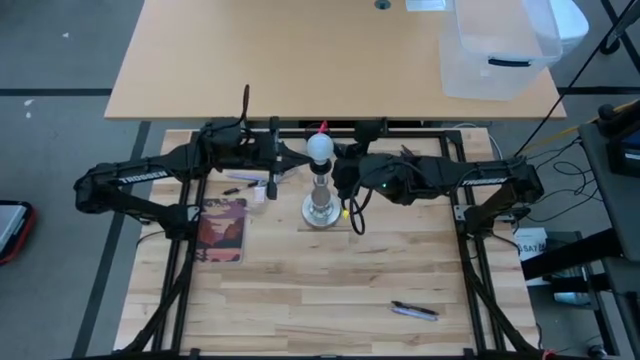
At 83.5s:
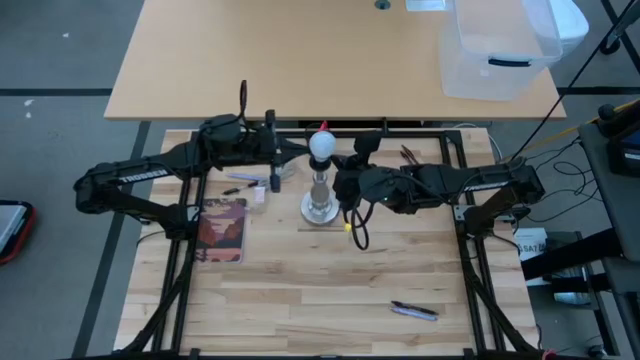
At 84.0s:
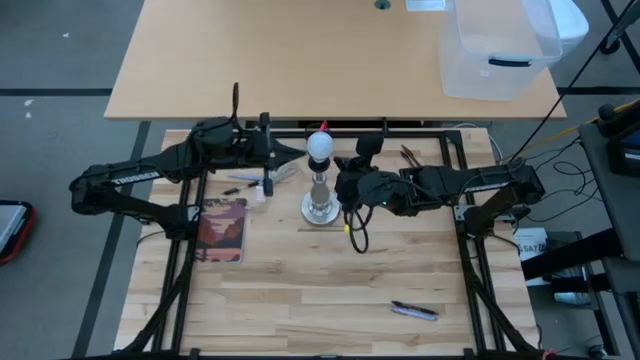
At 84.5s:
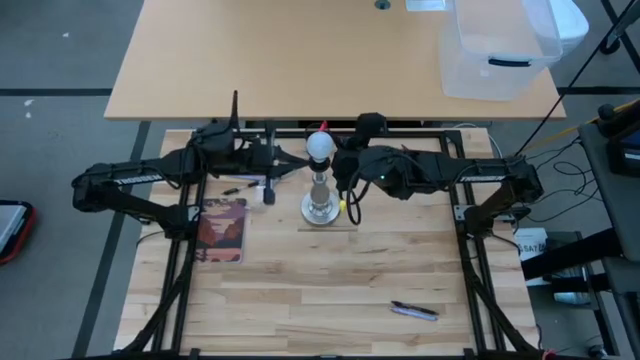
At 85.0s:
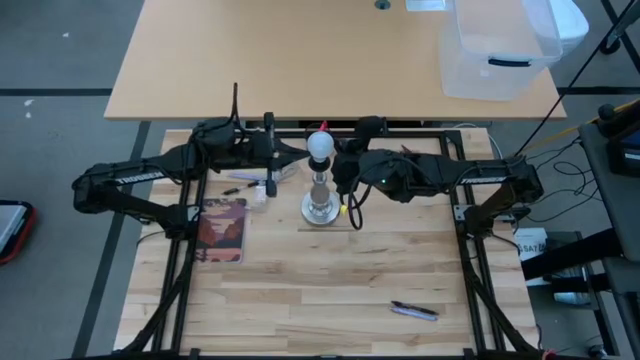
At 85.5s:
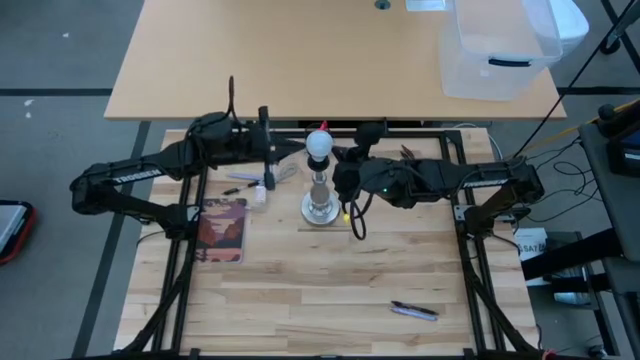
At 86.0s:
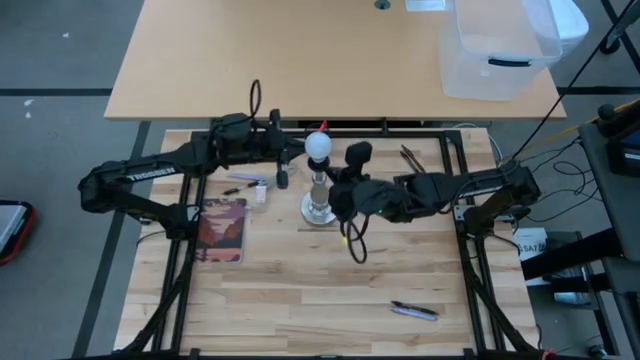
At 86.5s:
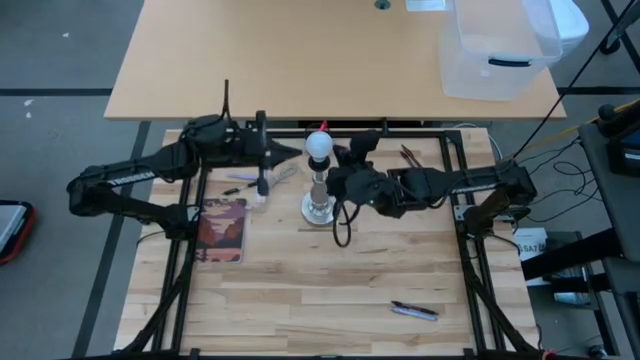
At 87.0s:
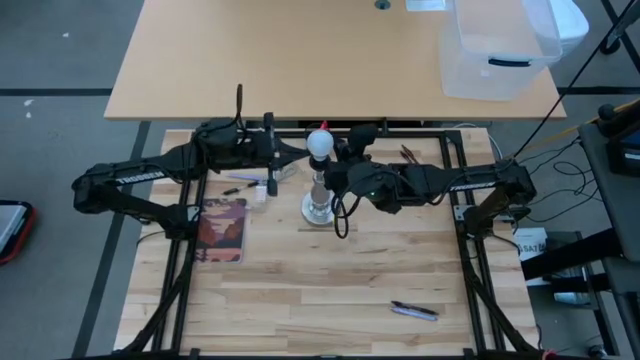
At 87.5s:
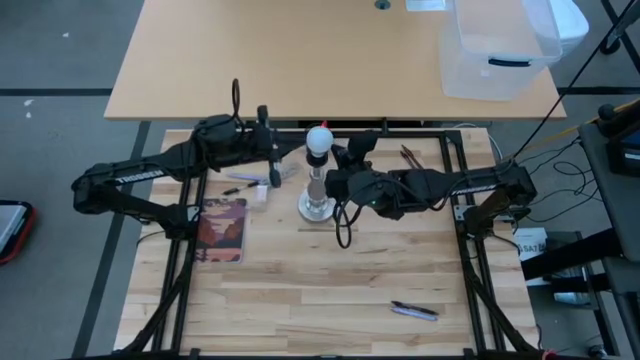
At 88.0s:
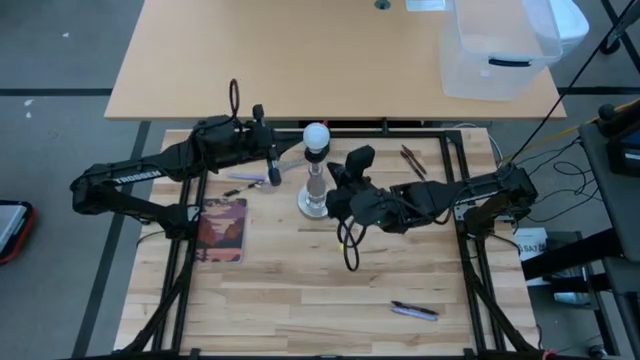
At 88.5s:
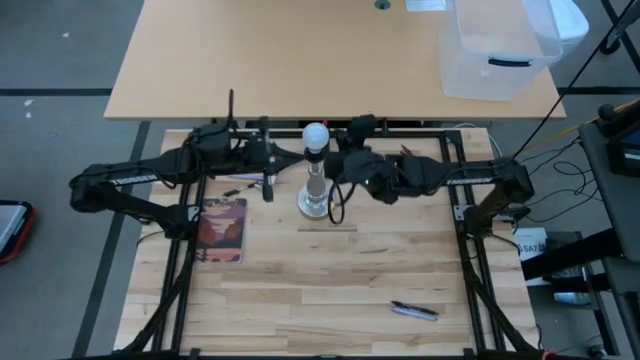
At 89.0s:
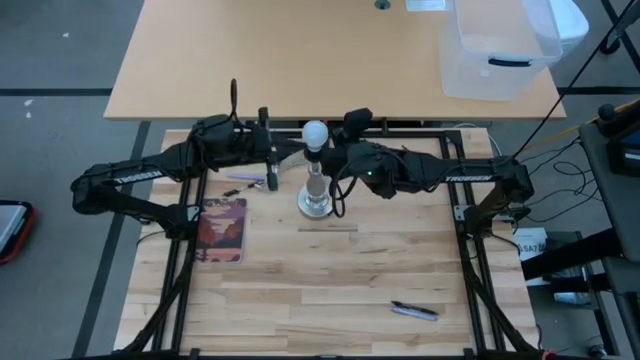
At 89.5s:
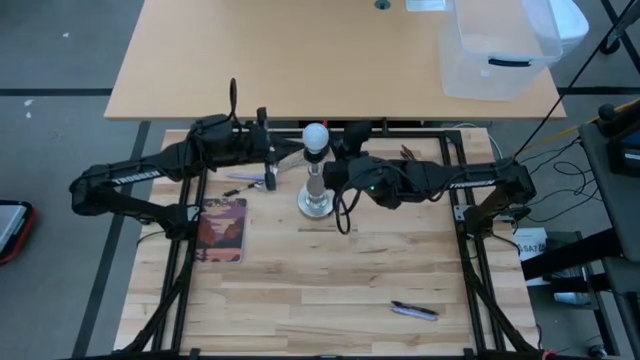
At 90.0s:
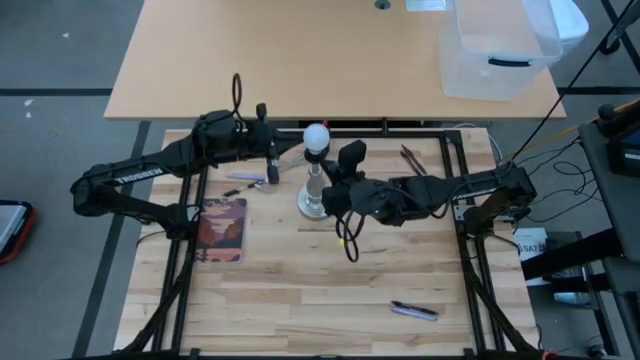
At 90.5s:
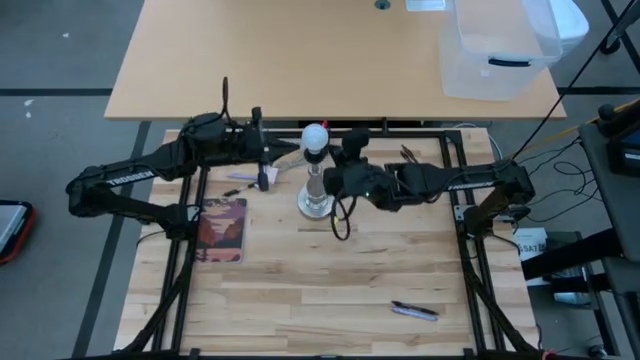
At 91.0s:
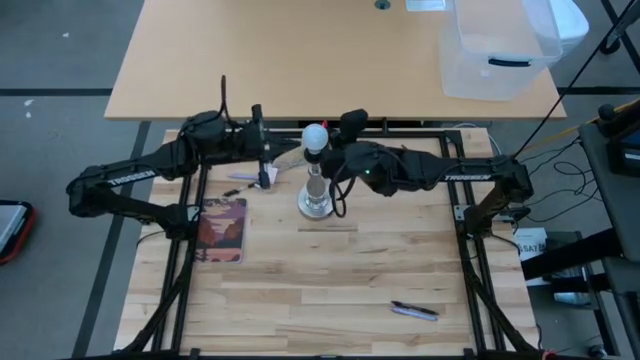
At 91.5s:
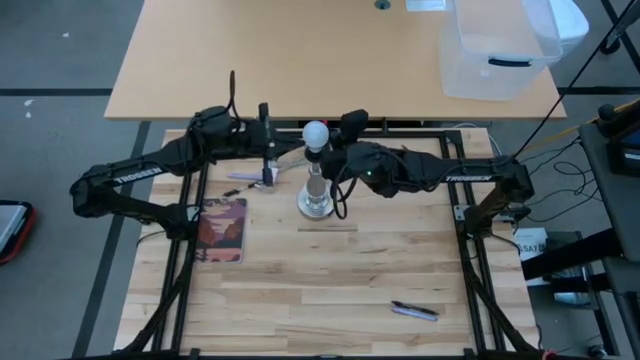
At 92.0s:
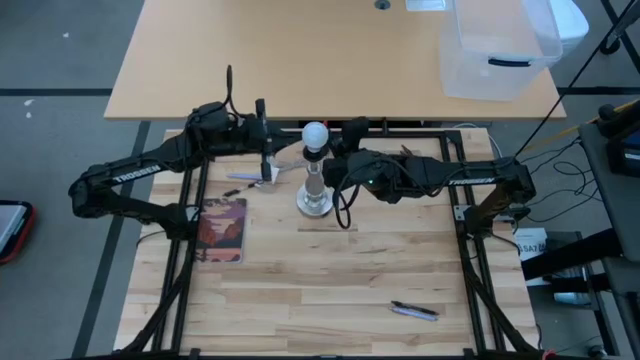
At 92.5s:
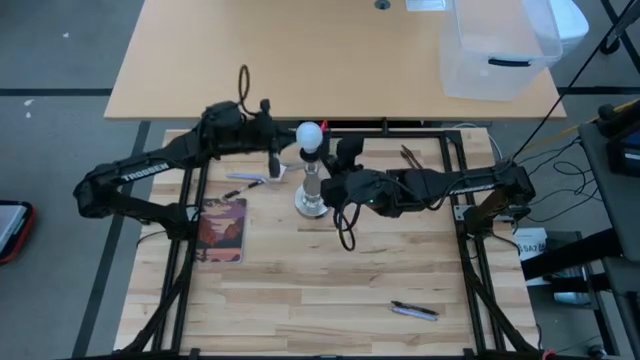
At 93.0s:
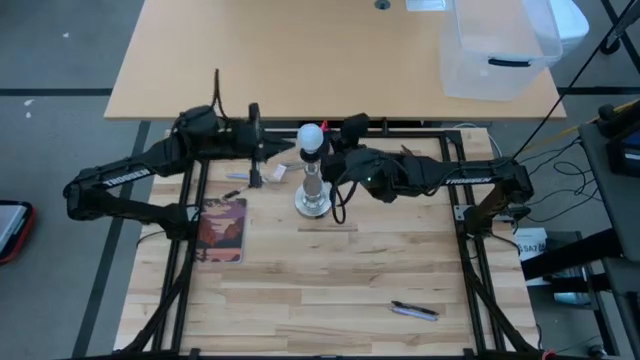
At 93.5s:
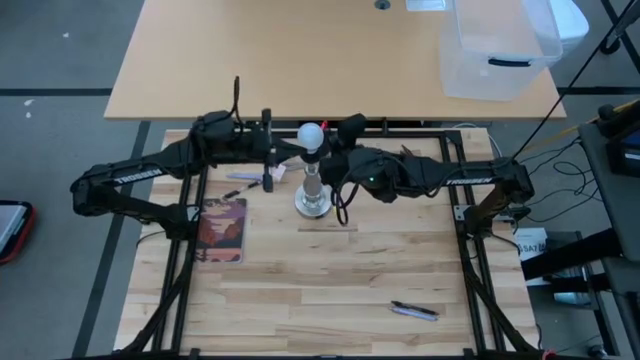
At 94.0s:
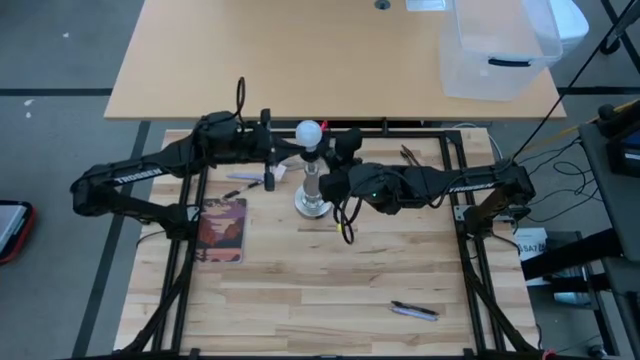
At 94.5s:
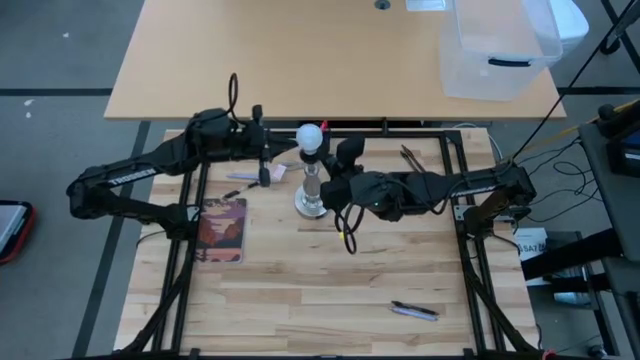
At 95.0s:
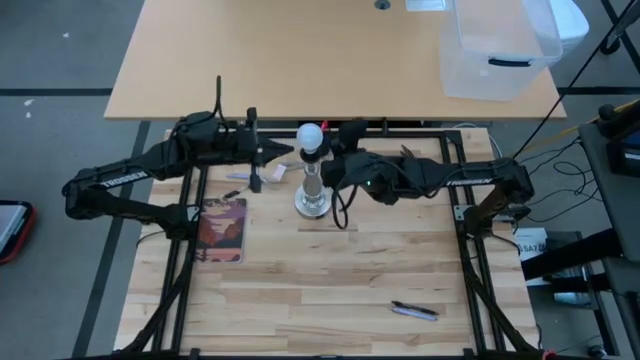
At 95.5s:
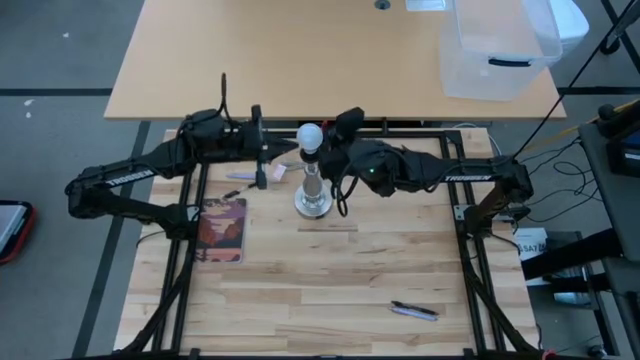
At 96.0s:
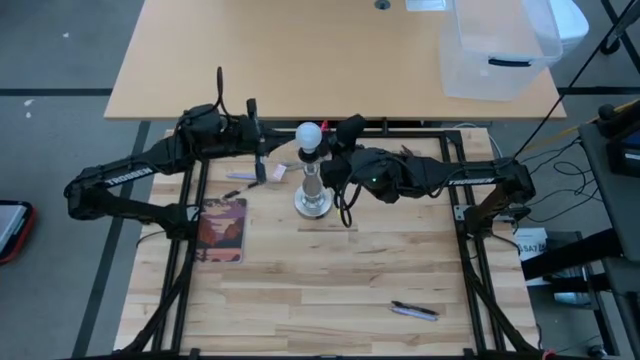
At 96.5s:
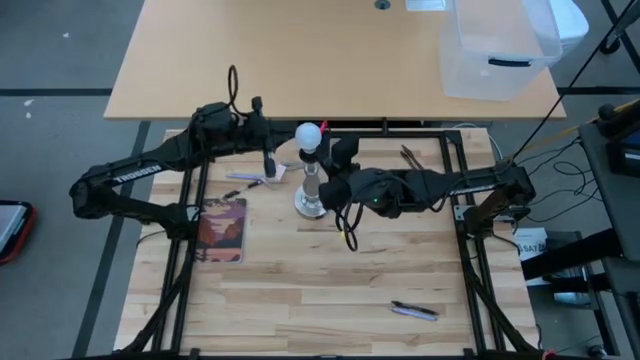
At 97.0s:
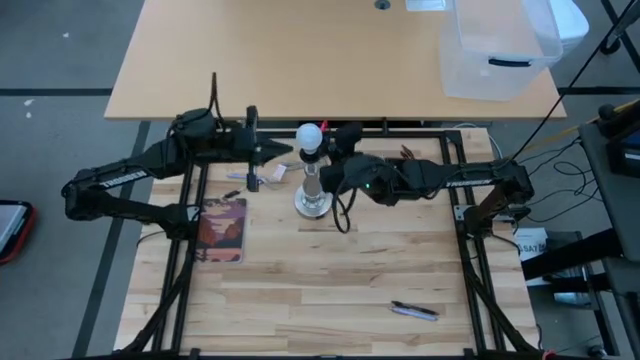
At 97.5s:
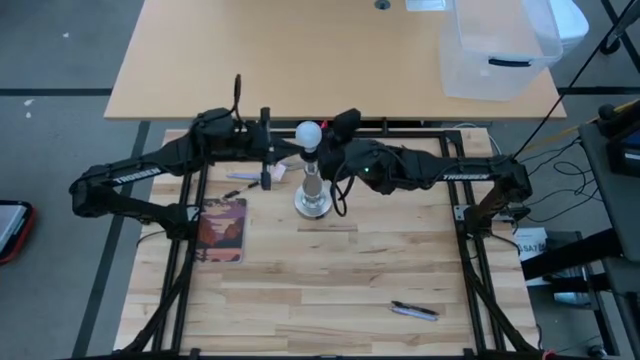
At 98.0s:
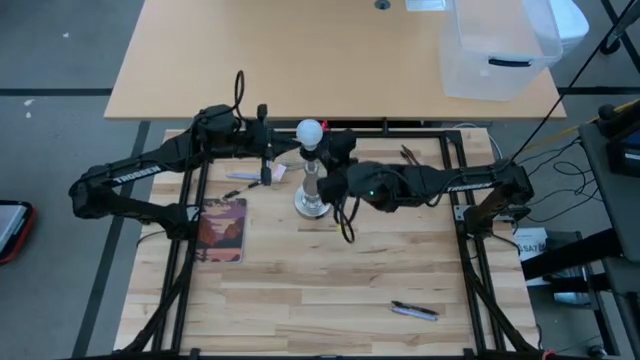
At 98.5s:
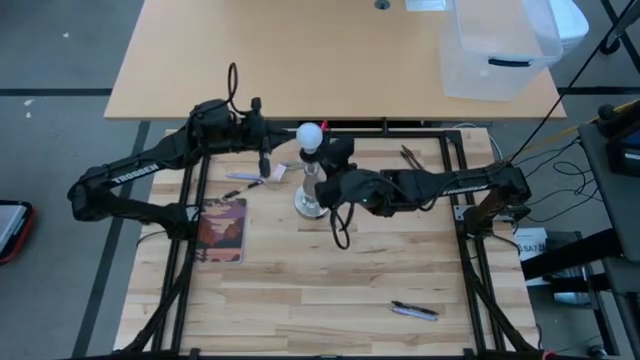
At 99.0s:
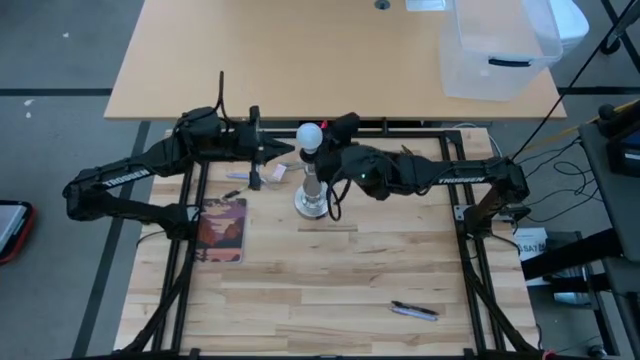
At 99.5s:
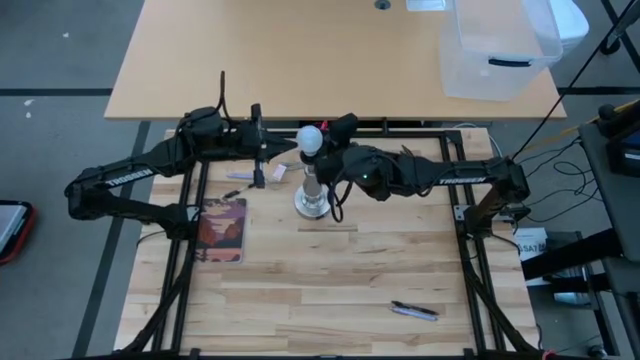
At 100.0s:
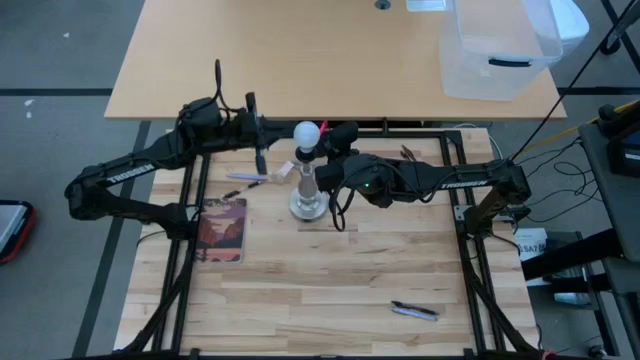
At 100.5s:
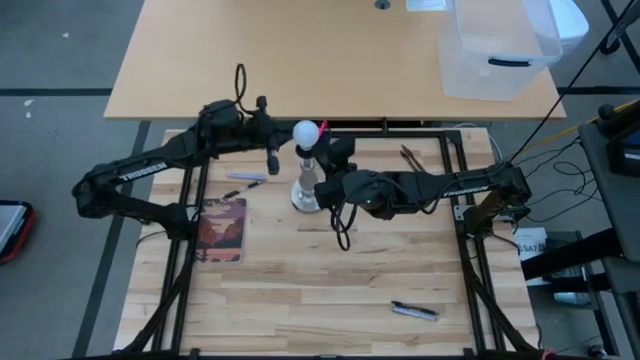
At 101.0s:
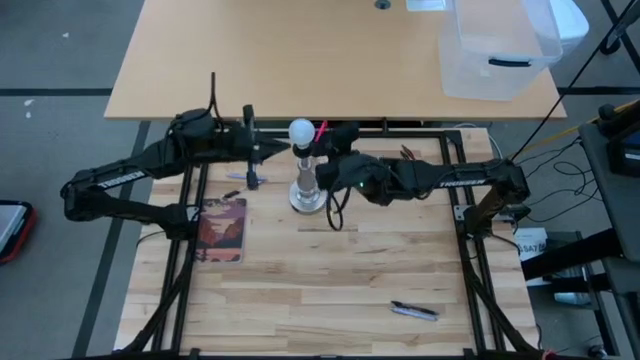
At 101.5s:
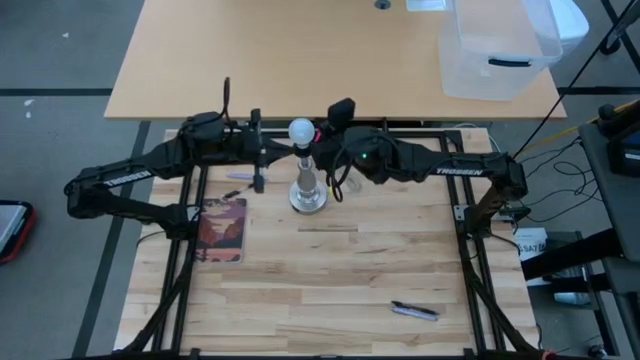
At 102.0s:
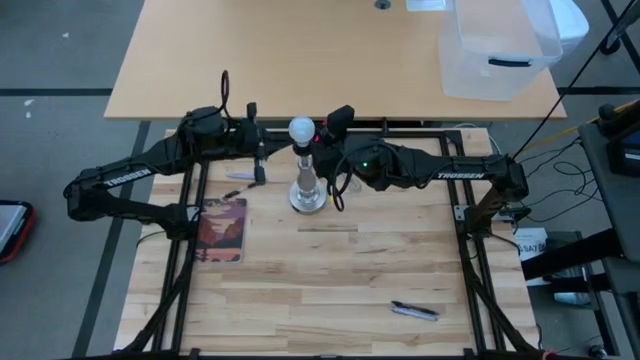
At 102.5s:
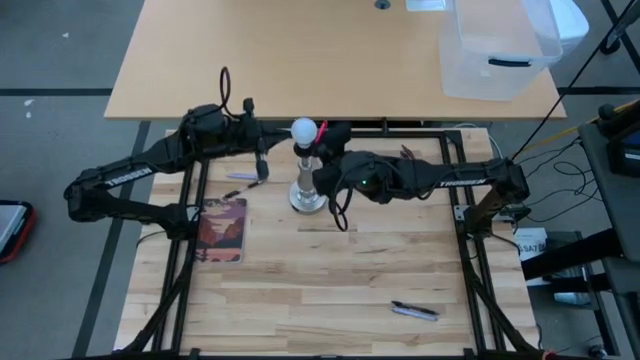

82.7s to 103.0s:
Task: Screw lightbulb
Insert the lightbulb into the desk lamp

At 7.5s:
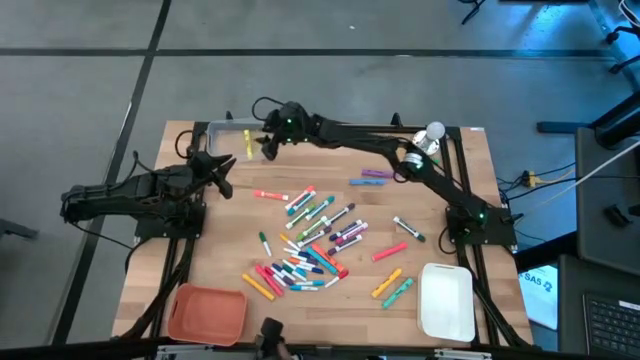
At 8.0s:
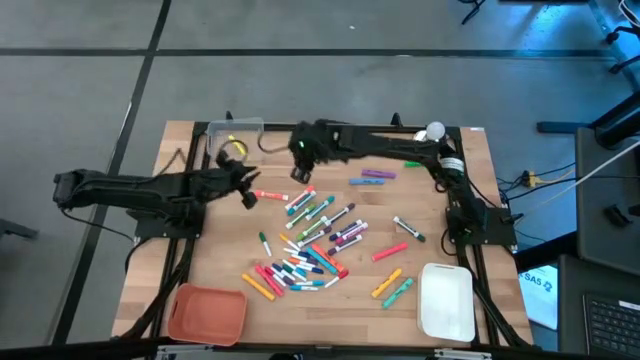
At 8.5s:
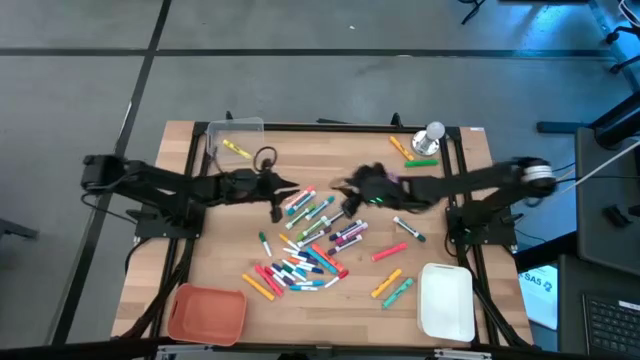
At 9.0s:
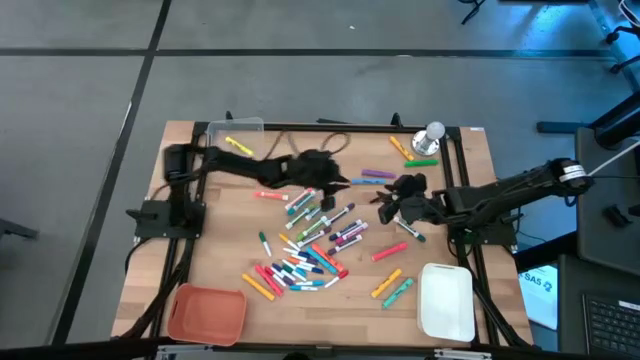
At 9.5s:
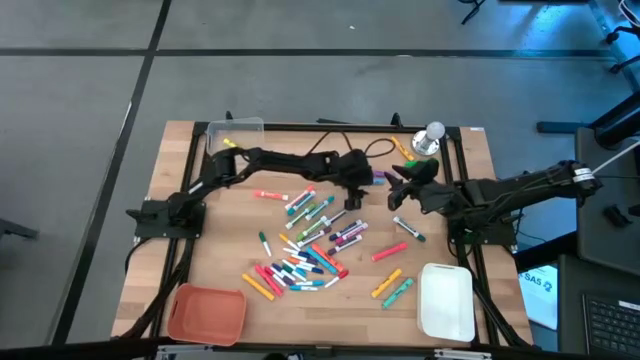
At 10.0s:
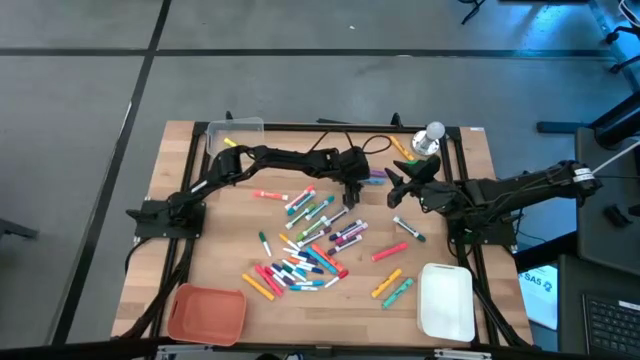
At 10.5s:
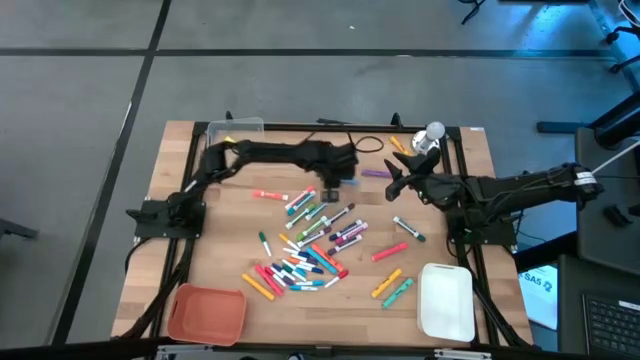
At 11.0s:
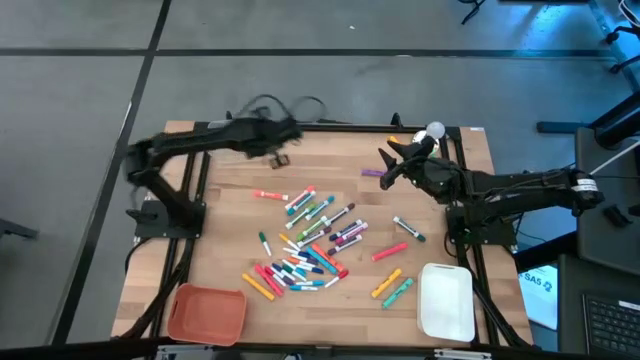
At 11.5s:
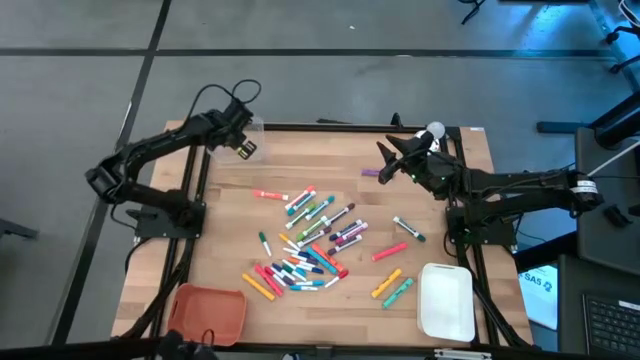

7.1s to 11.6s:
Task: Pick & Place Markers
Put the top right blue pen into the transparent bin
